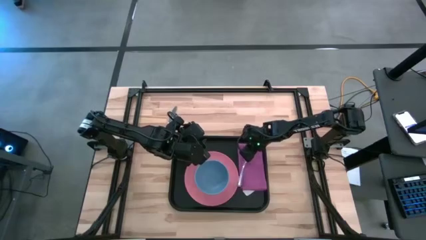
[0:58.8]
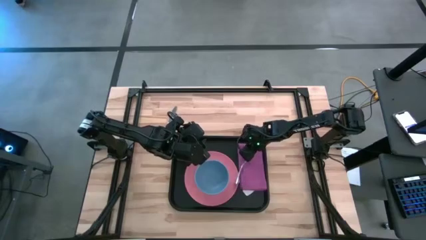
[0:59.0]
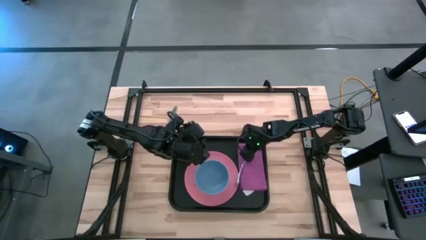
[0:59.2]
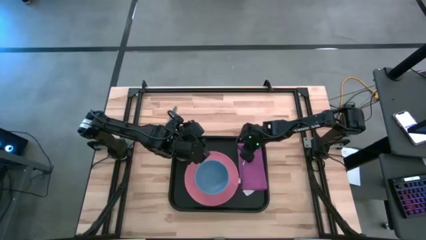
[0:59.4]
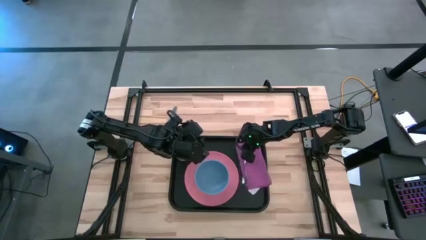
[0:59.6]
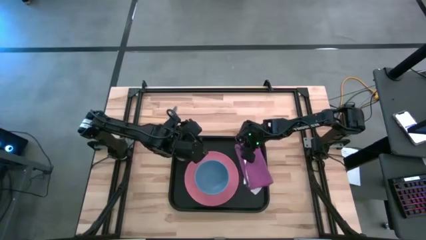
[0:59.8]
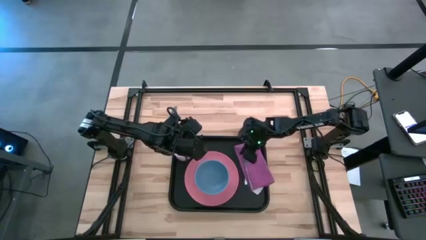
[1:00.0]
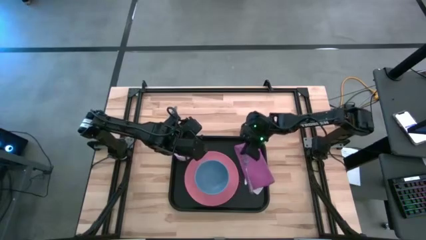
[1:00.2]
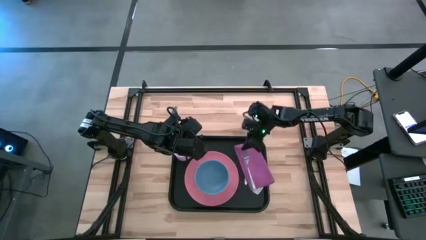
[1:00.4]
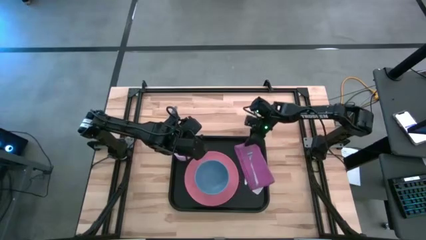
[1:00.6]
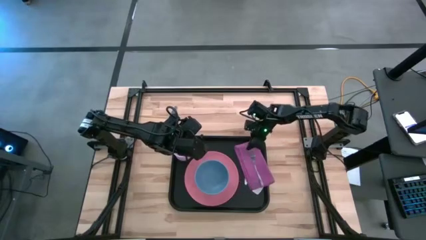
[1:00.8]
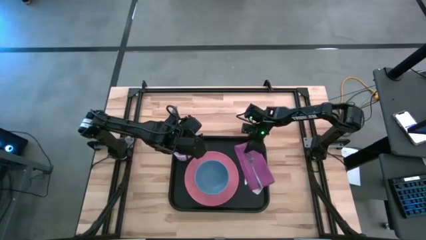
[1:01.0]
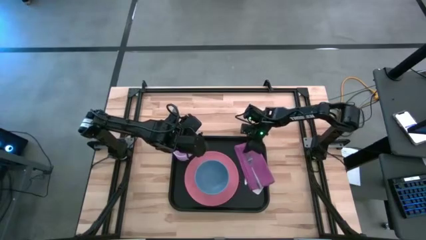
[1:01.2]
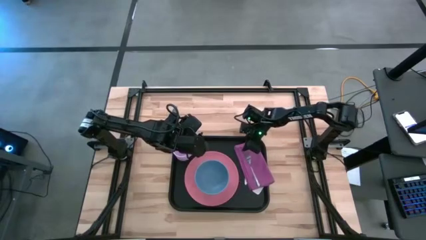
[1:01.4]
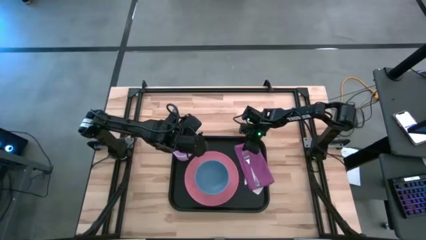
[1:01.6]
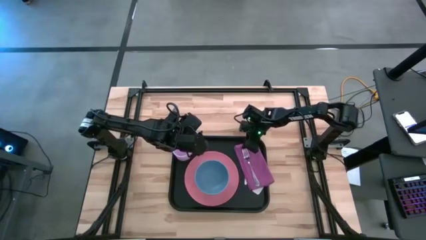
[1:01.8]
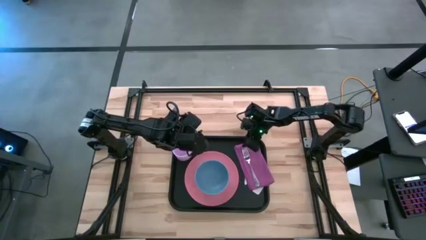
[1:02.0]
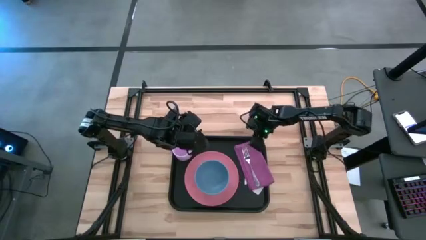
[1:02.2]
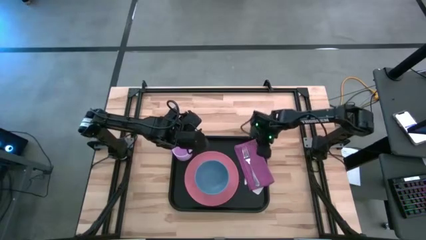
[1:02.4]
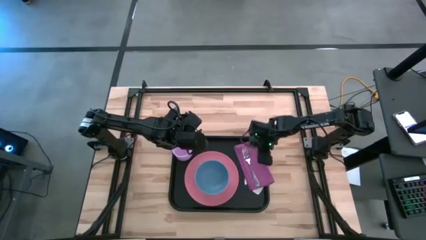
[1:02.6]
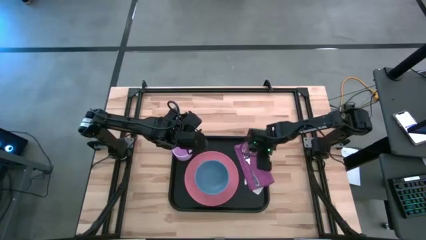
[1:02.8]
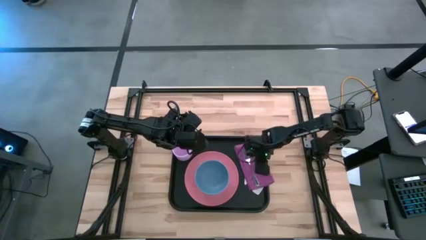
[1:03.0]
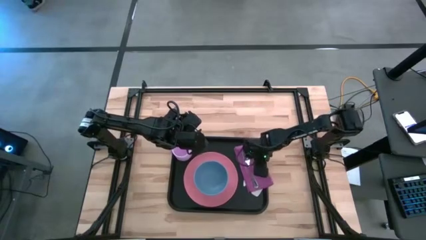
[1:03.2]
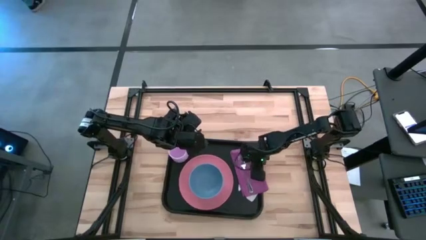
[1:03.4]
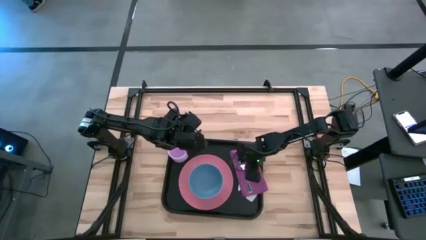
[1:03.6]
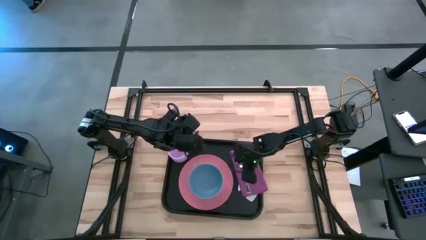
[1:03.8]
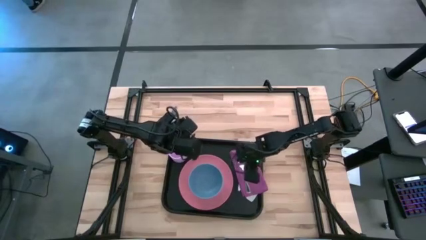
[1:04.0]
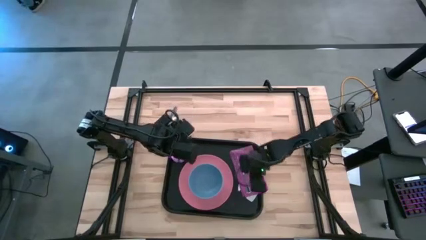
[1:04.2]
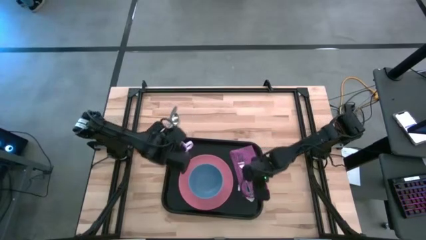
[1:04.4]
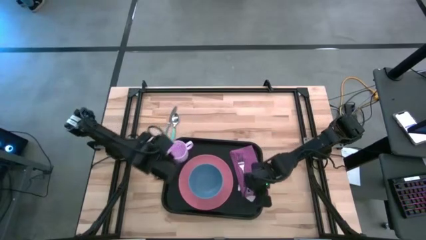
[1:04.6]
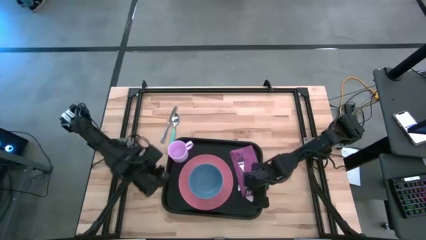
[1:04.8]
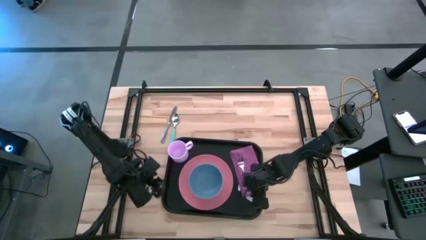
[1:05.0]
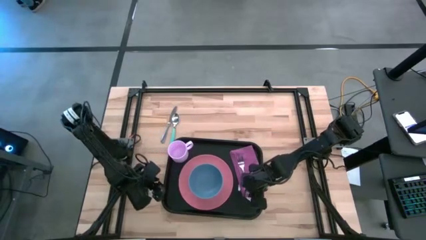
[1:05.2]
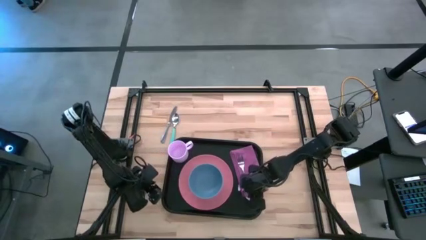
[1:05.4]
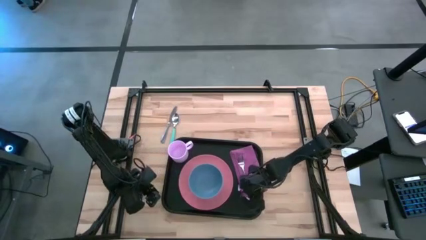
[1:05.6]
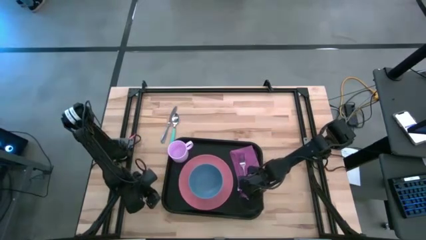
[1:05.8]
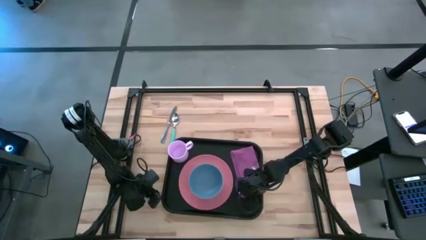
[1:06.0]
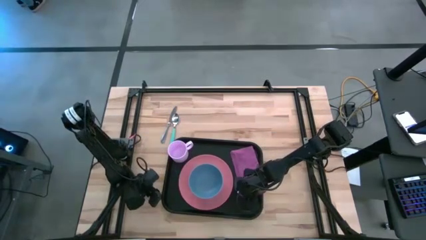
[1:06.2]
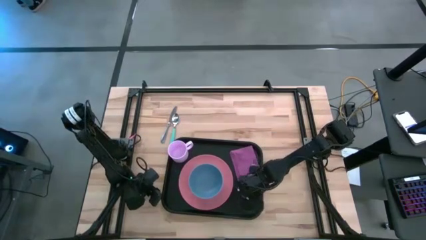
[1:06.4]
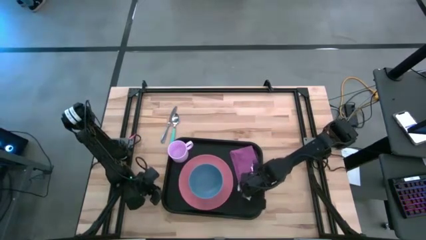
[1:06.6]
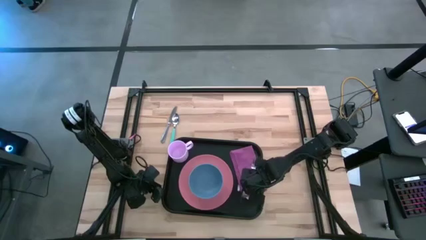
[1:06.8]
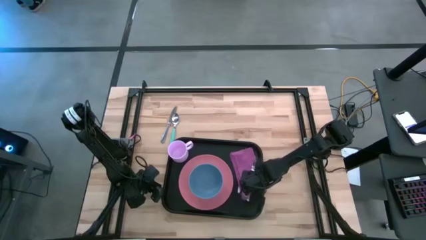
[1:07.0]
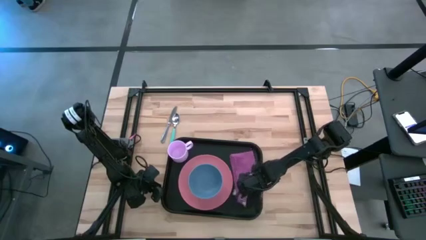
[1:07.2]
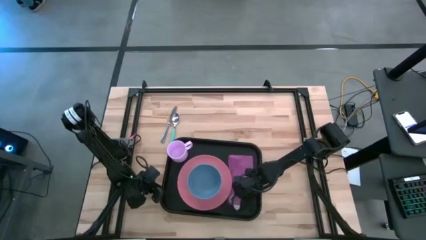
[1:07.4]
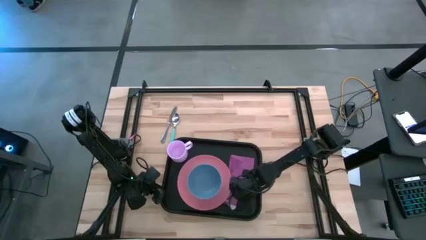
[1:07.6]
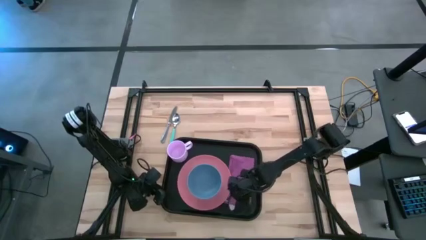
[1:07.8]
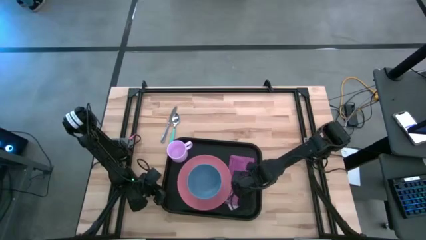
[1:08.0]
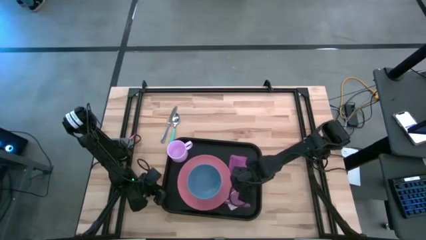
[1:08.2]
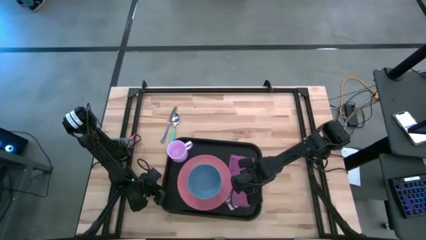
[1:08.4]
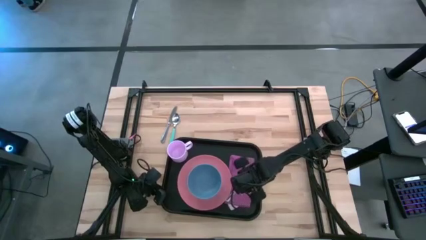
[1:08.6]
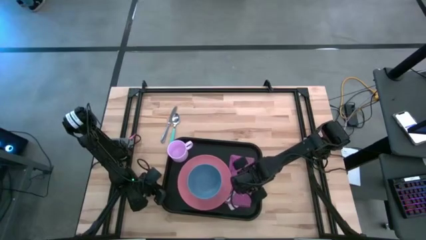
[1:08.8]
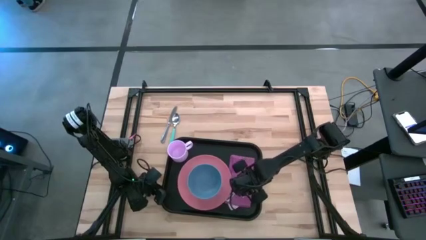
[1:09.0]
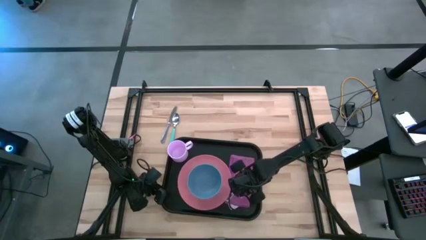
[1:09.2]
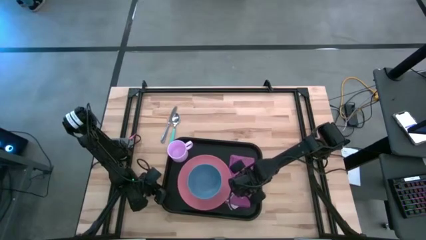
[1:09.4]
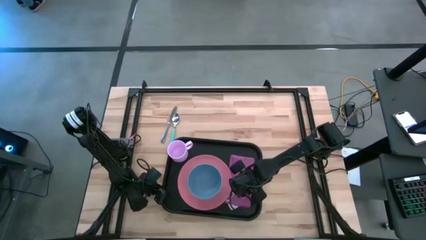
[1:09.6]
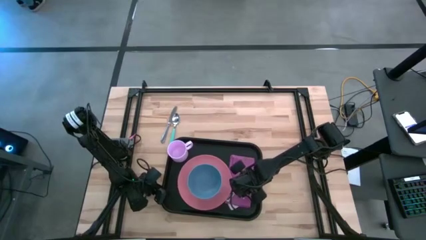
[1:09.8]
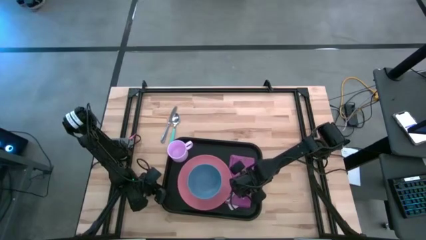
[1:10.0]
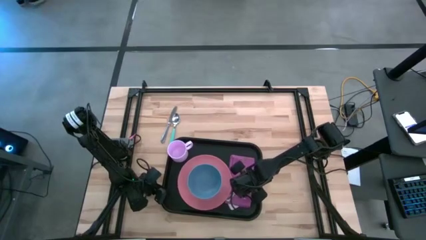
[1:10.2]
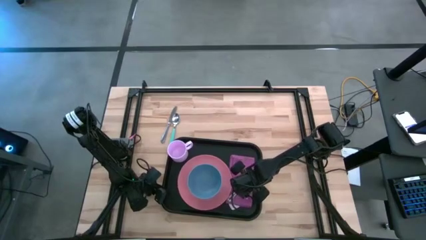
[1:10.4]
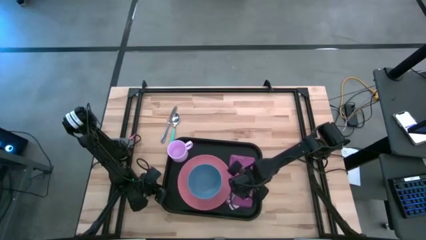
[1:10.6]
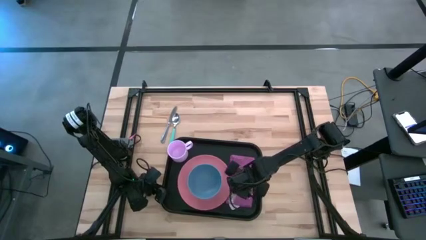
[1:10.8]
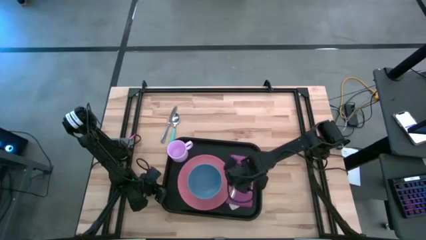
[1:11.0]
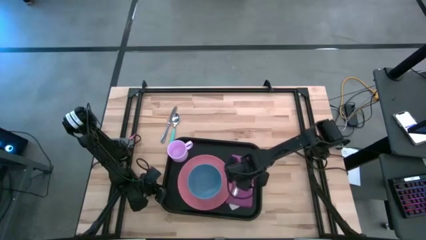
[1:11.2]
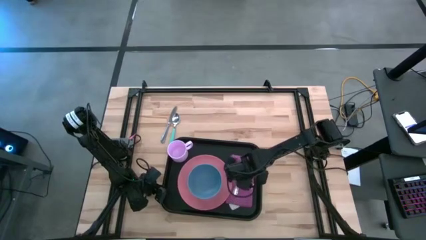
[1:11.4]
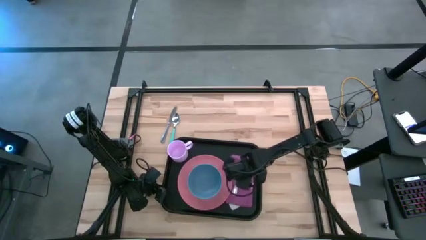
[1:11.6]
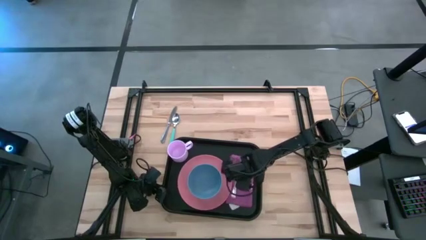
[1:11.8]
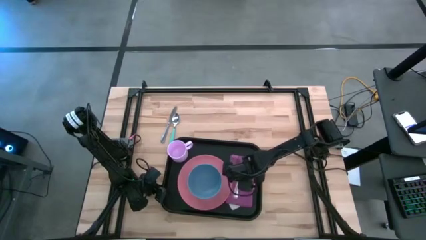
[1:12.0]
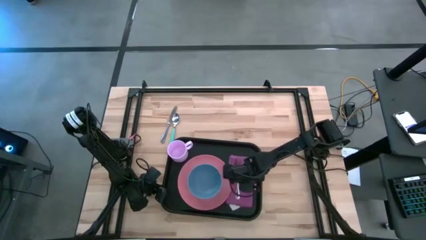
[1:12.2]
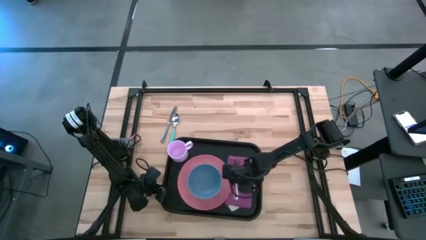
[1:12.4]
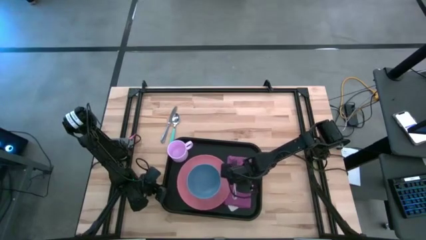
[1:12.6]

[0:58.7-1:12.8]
Task: Set up tray
Put the silver fork on top of the purple napkin on the black tray

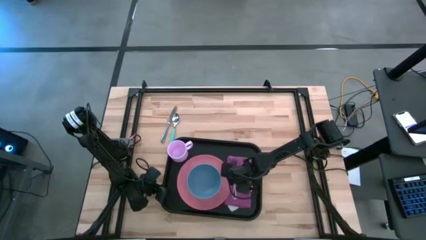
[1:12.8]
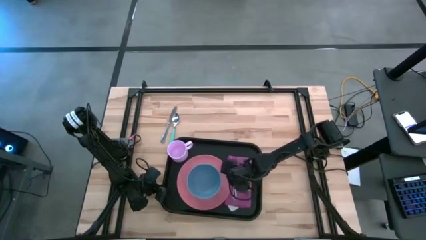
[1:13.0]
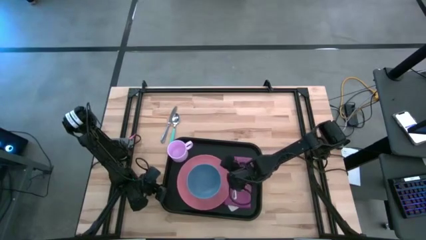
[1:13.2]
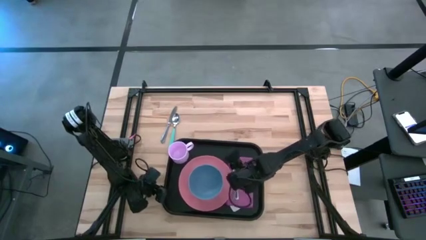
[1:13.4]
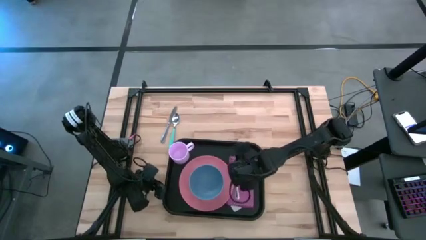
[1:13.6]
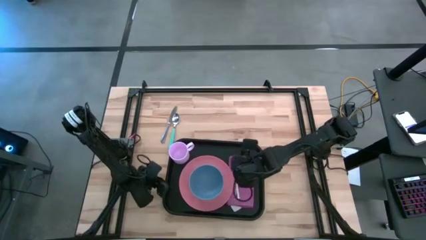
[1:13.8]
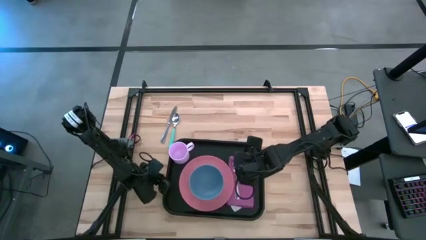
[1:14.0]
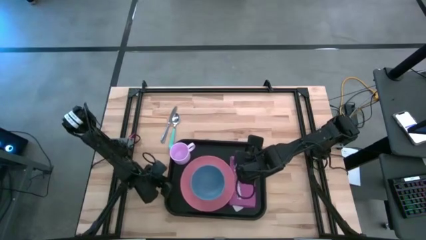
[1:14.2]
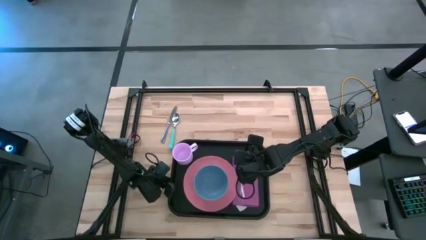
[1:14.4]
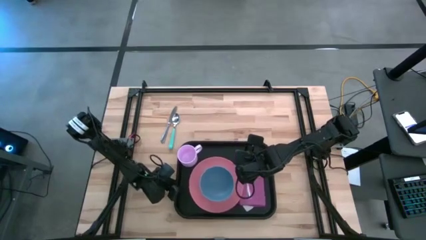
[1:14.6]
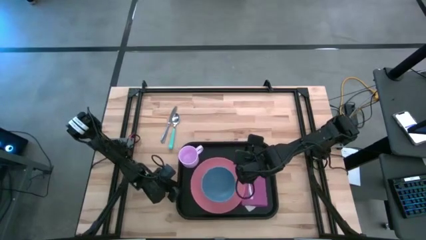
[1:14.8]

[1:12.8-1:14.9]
Adjust the black tray

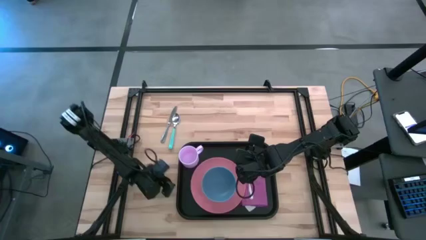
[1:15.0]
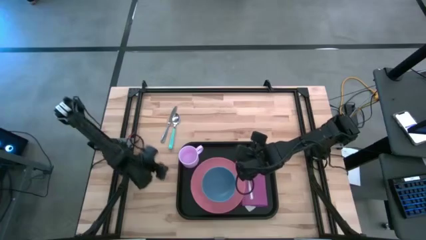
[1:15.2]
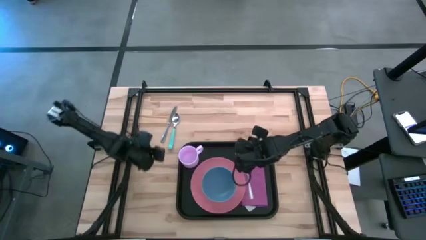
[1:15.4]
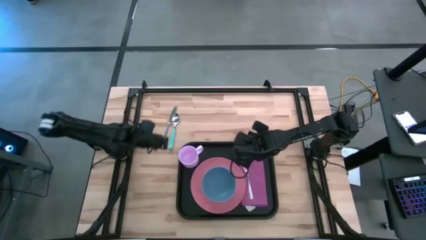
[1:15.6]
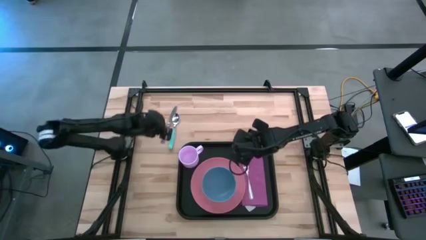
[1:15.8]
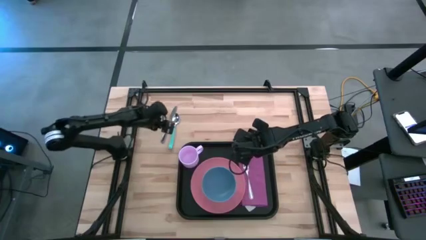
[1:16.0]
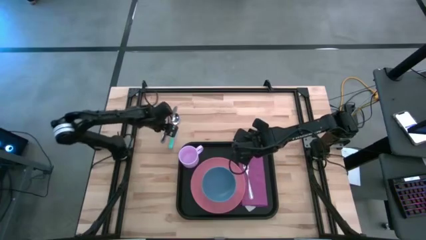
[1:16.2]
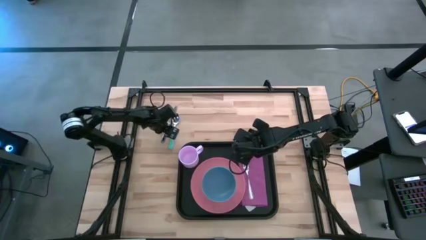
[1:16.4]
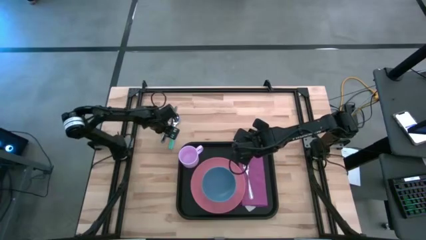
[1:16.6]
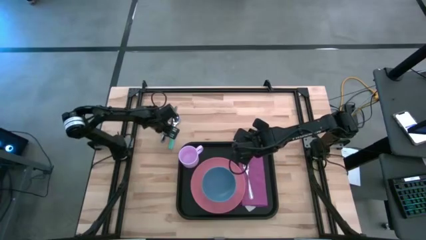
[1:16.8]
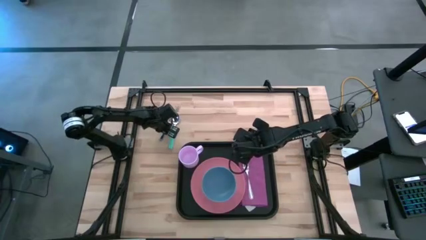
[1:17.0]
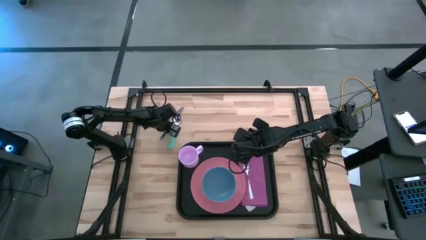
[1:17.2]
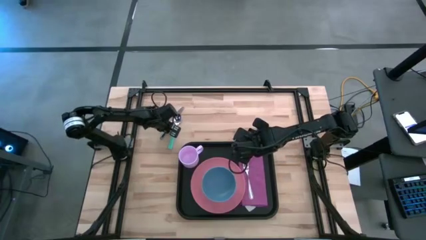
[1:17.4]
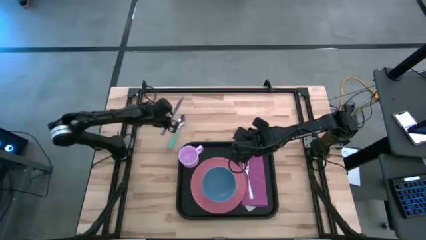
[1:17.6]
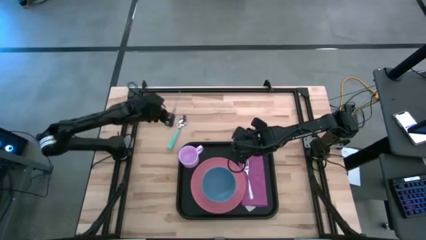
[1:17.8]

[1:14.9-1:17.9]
Put the silver knife on top of the purple napkin to the right of the silver fork on the black tray
